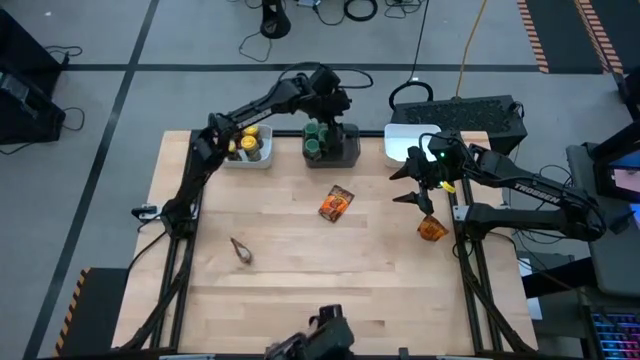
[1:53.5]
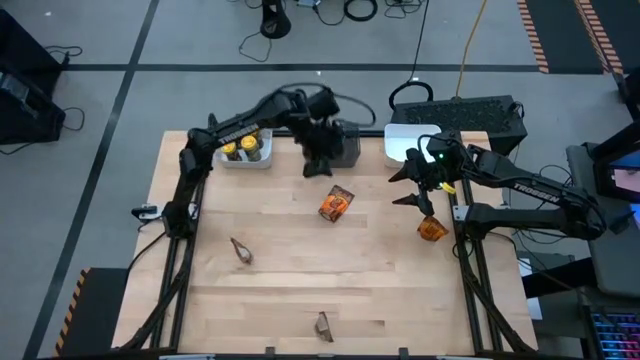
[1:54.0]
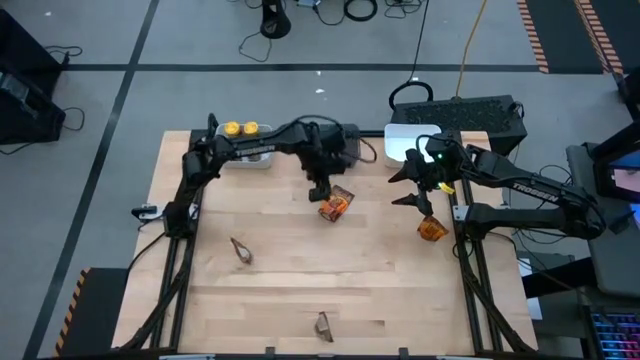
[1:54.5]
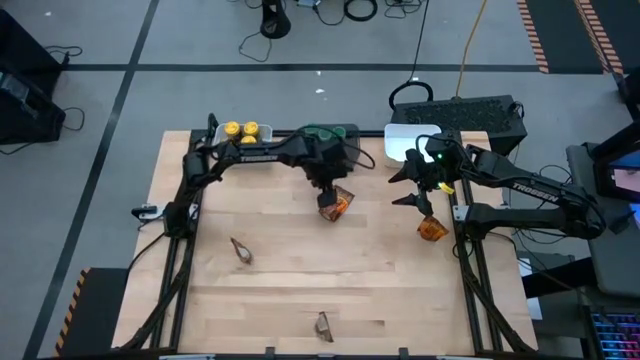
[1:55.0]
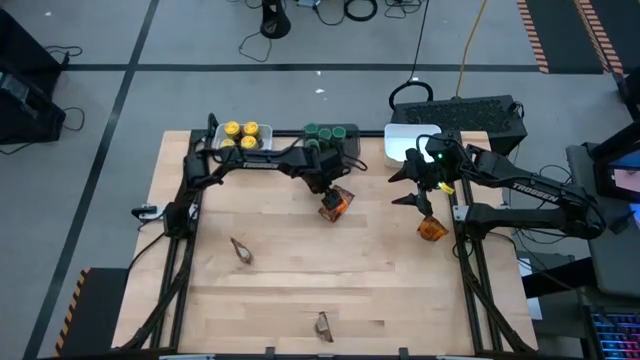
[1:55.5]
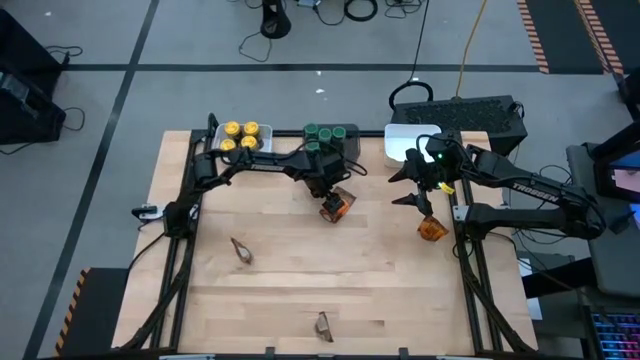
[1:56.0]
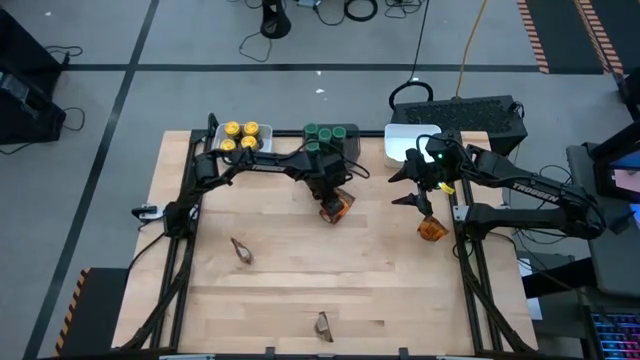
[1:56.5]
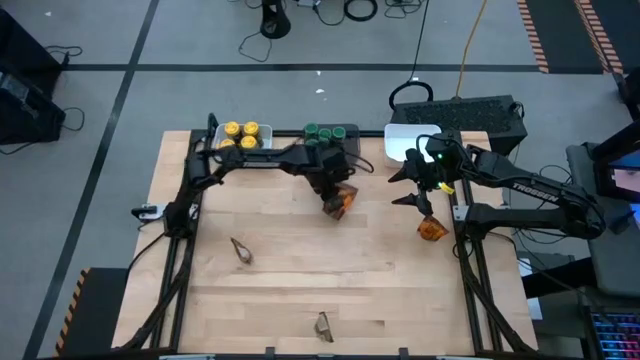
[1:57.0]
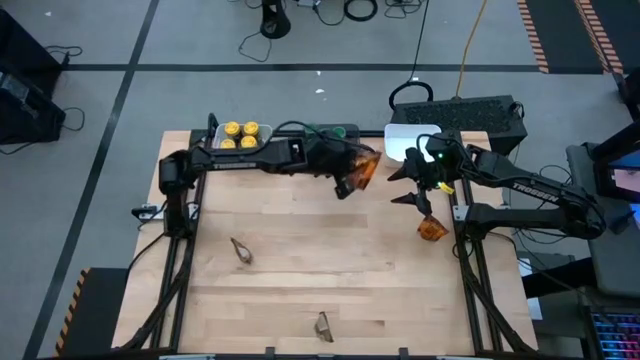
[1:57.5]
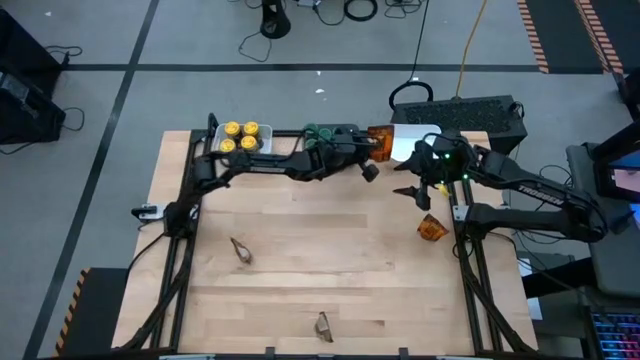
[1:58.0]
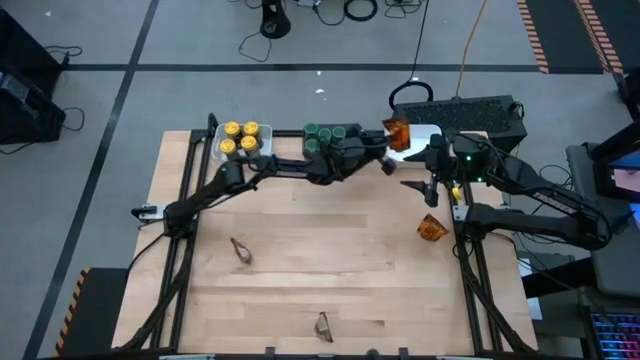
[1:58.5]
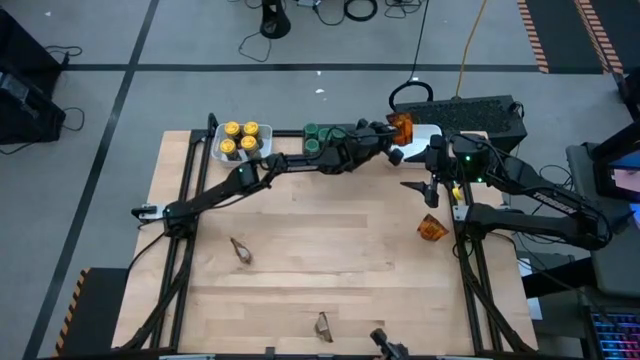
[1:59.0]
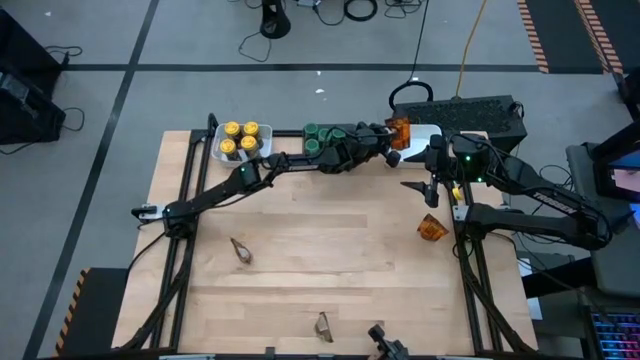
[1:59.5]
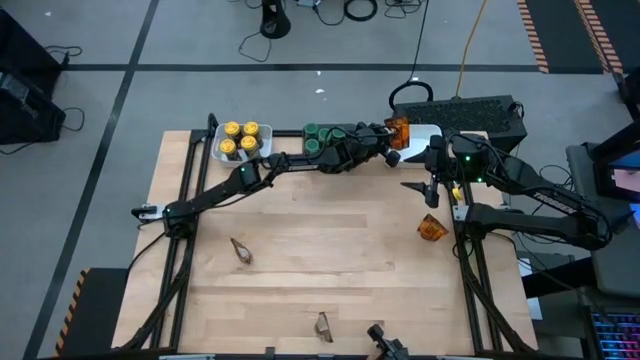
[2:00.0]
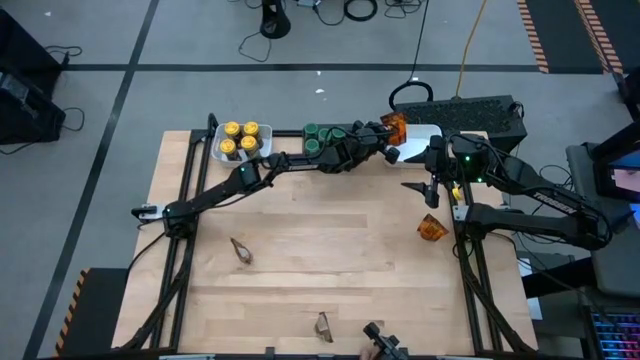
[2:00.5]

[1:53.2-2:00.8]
Task: Sort spices by type
Put the top center orange seasoning pack into the right white bin

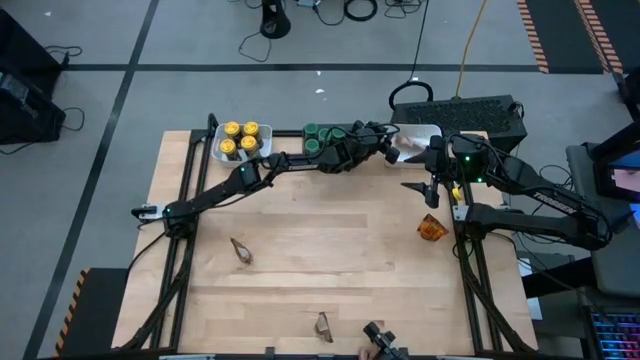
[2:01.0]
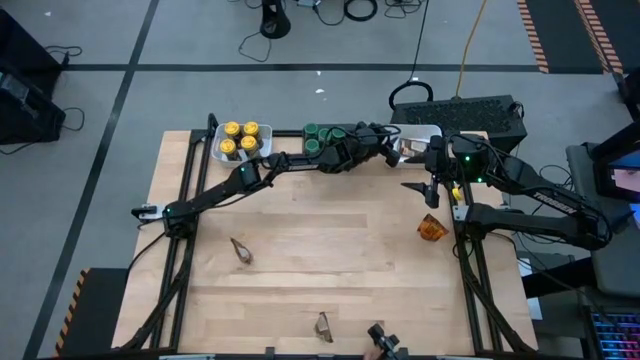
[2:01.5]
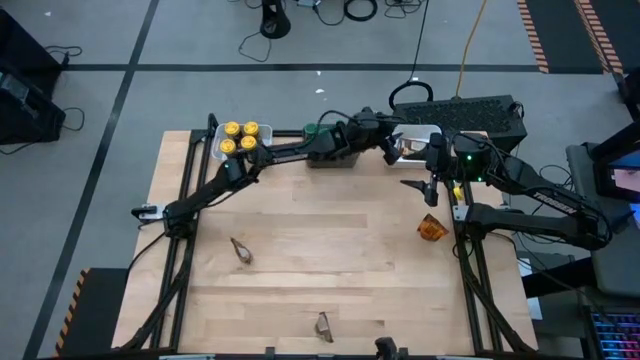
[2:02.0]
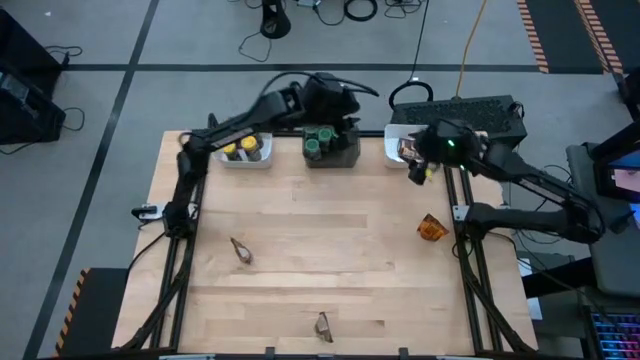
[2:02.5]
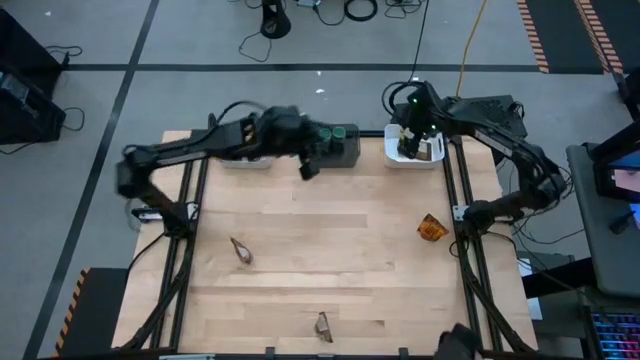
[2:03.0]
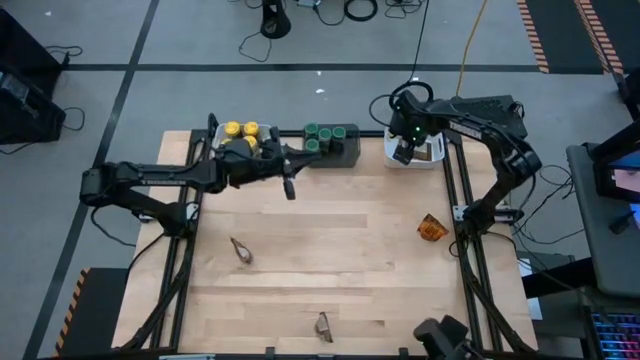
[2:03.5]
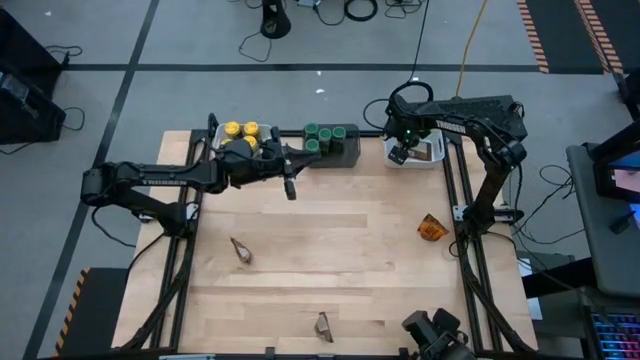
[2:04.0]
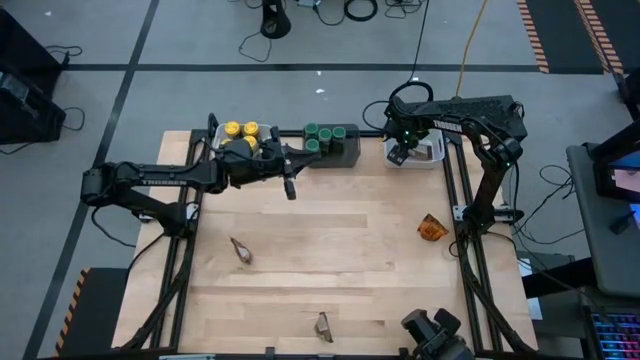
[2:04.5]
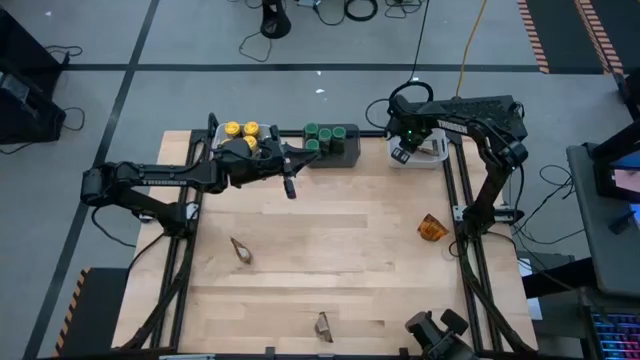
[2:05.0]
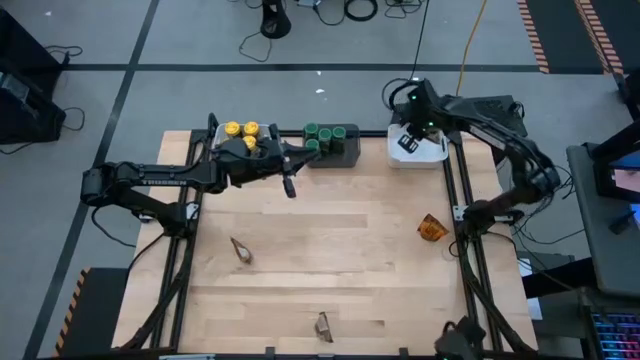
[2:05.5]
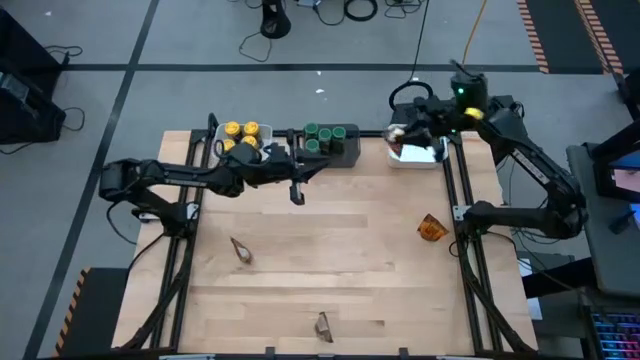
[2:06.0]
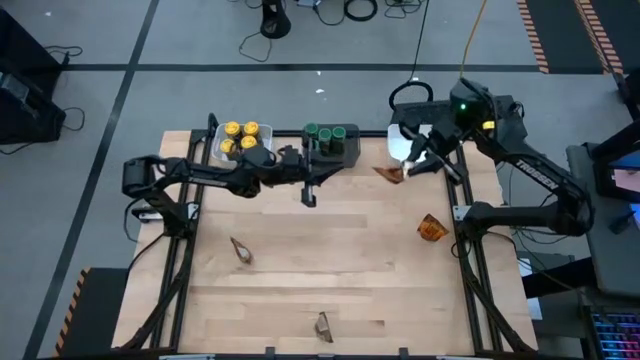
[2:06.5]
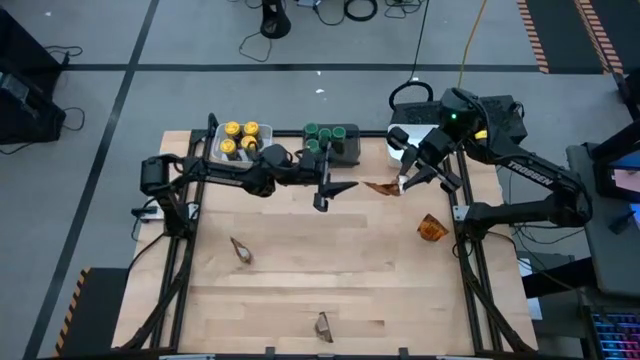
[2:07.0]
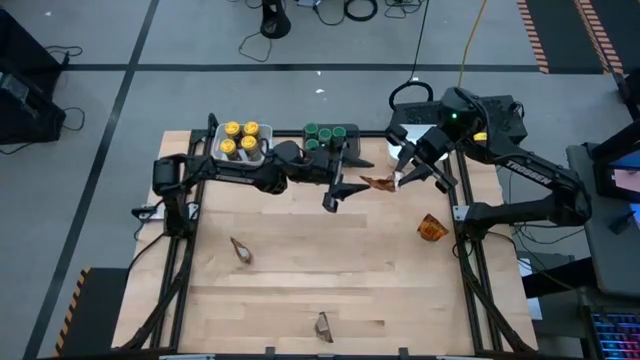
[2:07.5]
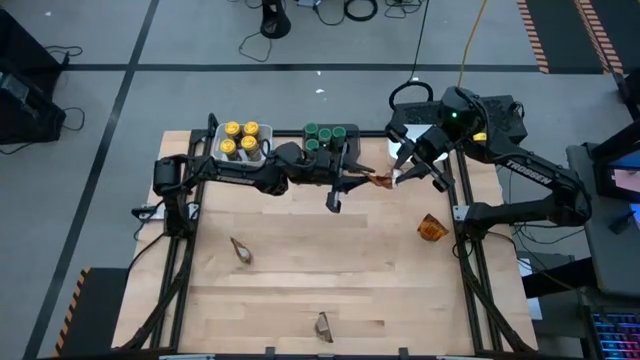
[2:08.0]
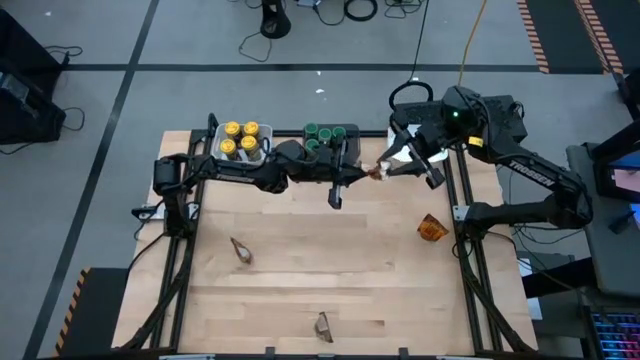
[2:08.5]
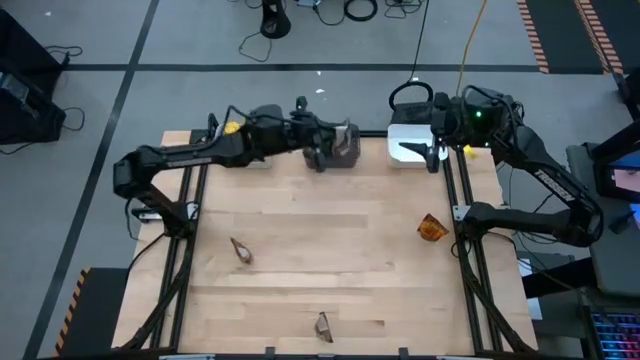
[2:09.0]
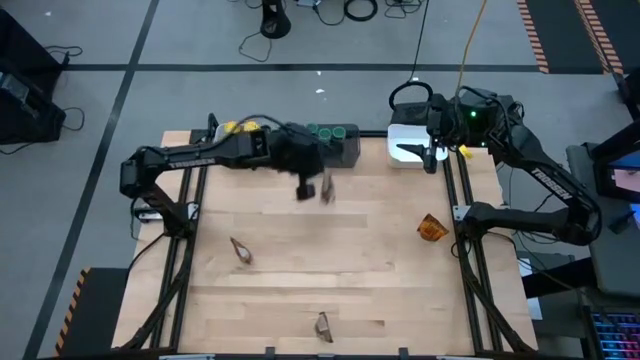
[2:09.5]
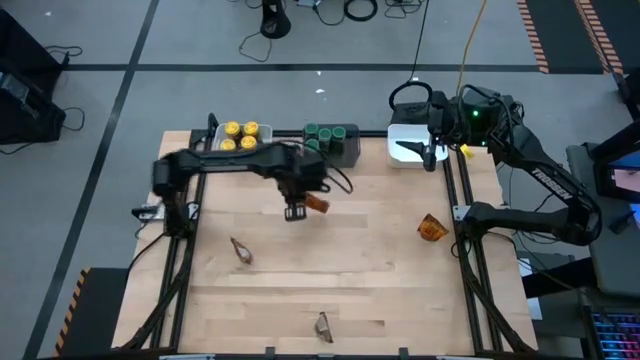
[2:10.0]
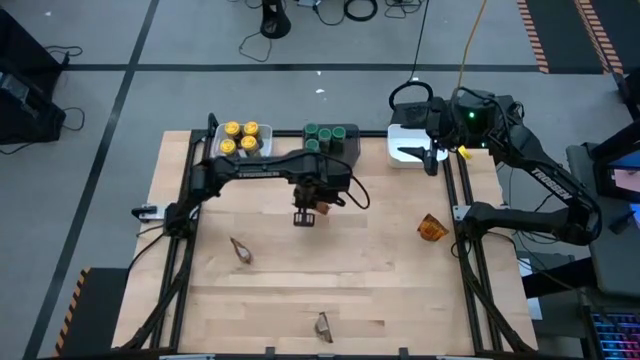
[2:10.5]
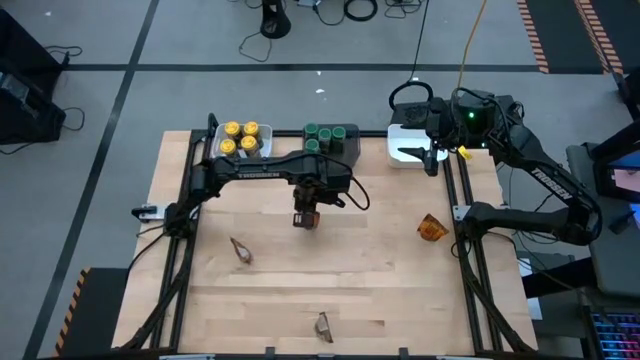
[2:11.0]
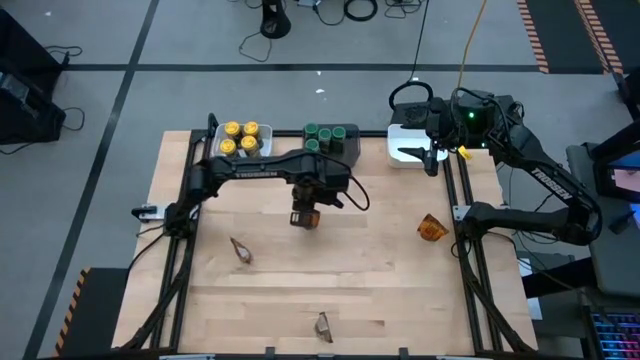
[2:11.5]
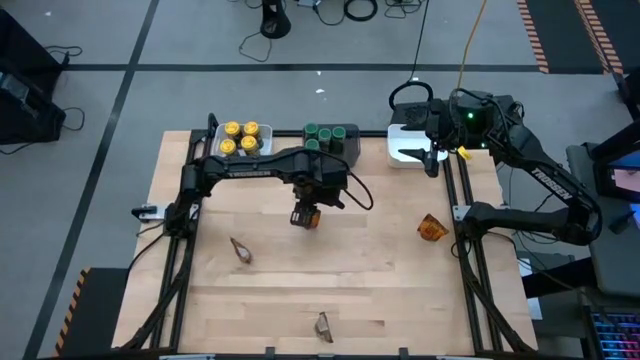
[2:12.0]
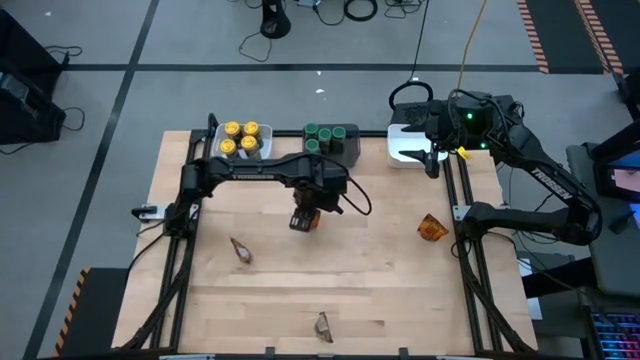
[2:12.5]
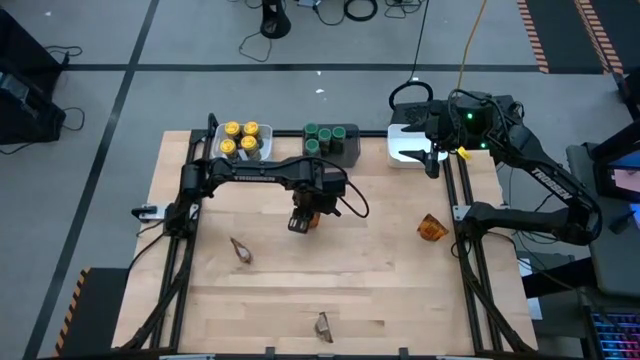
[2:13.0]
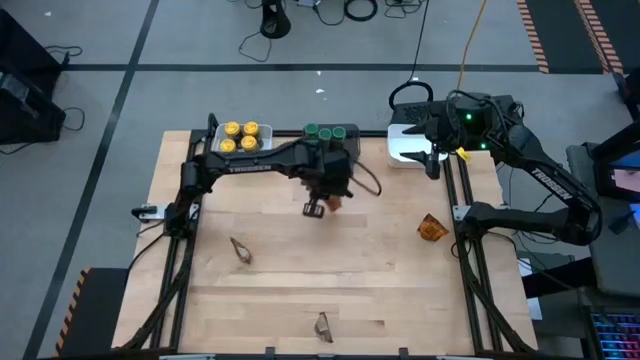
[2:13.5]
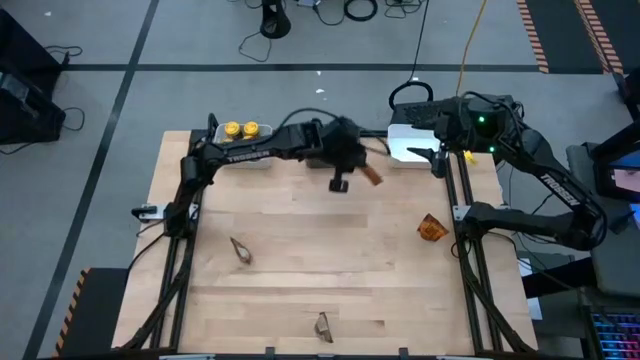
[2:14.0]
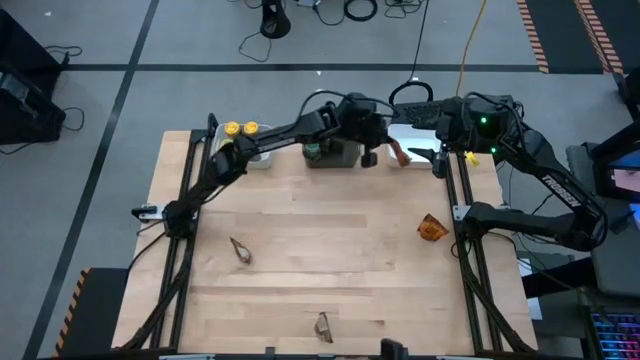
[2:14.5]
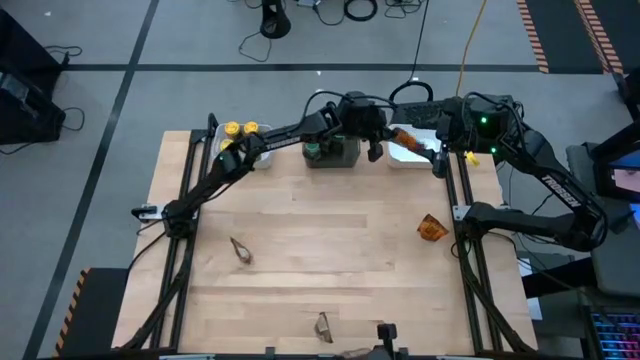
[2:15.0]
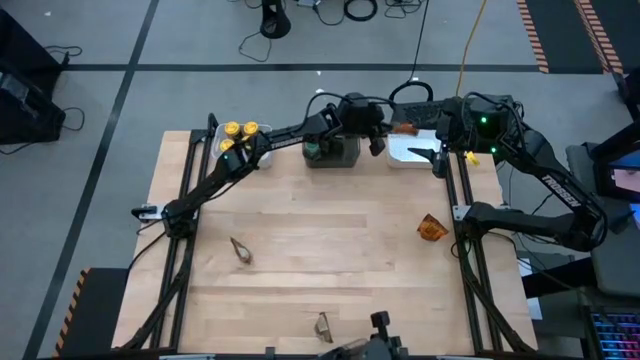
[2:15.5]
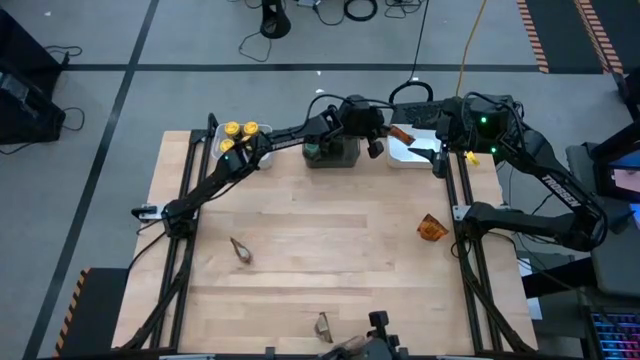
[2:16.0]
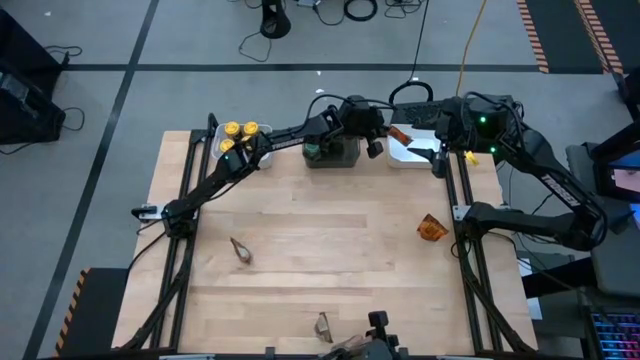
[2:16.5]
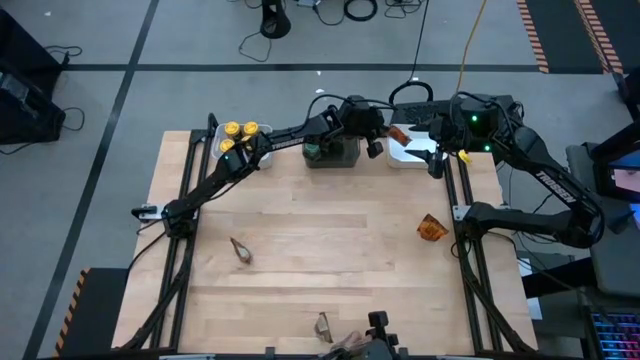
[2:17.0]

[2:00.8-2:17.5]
Put the top center orange seasoning pack into the right white bin
